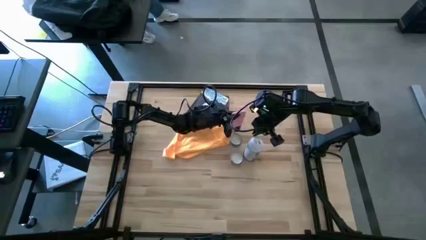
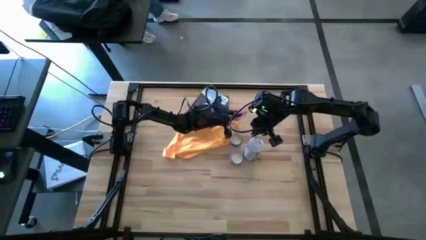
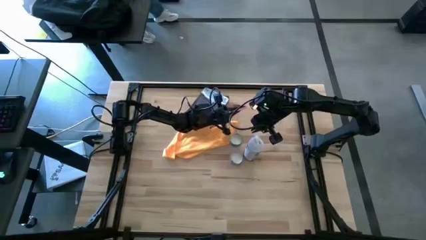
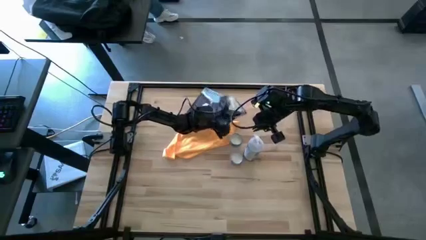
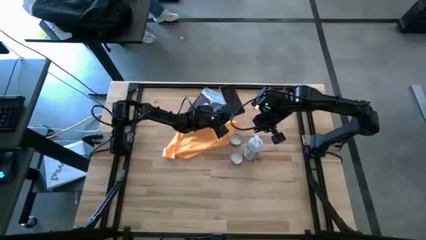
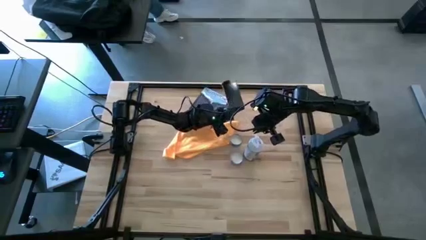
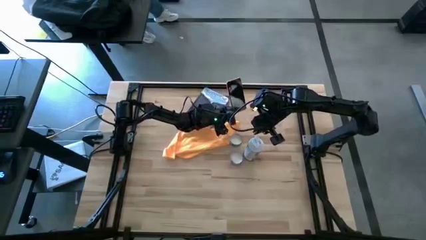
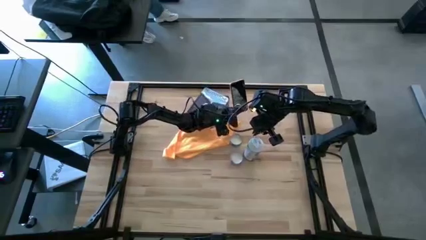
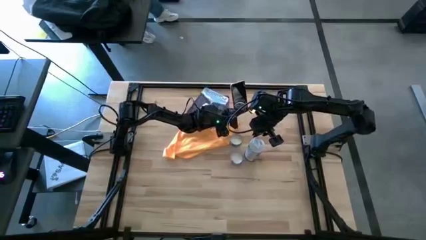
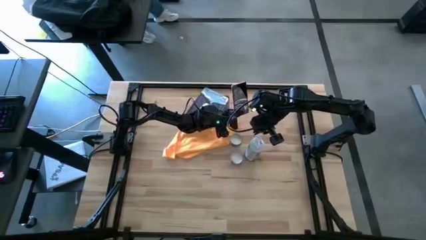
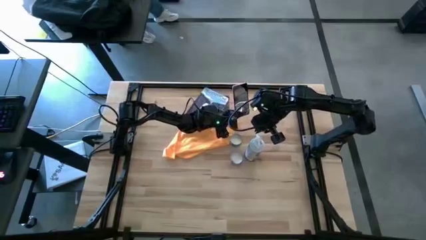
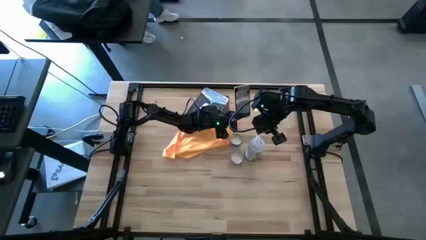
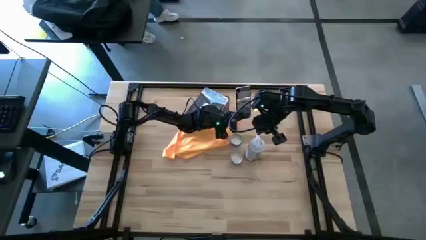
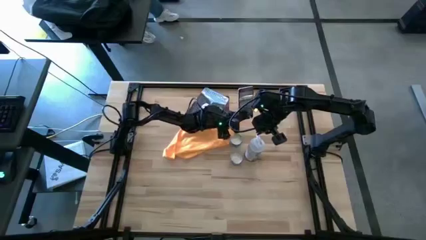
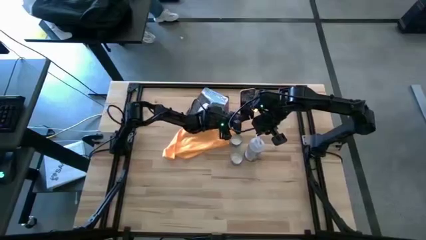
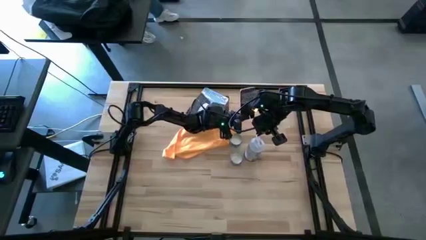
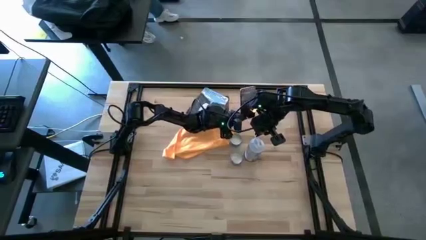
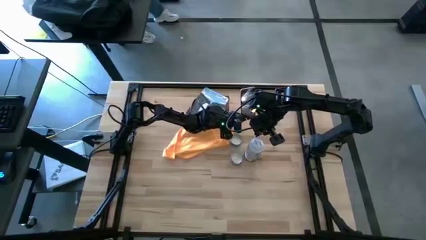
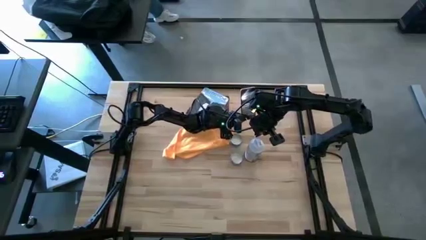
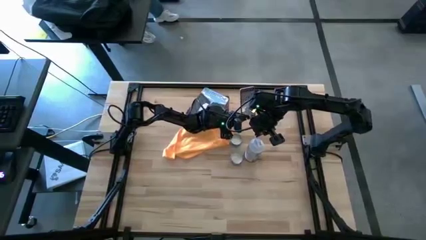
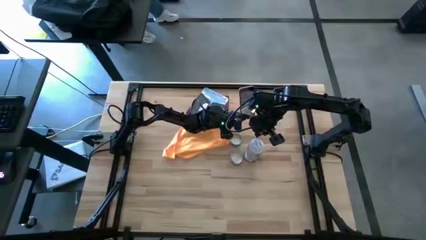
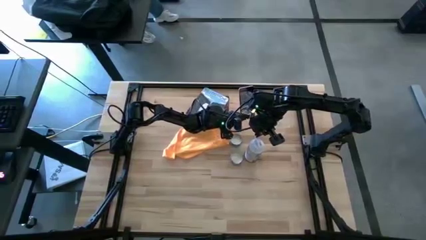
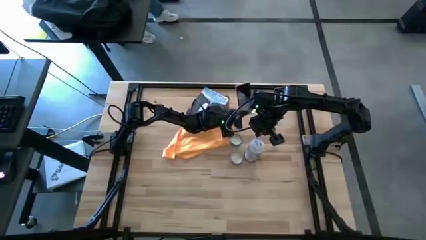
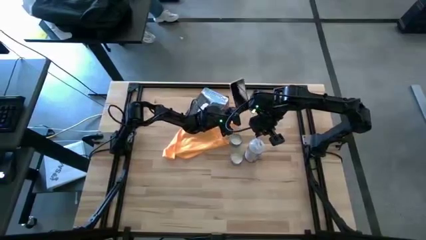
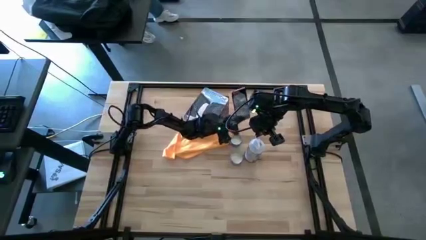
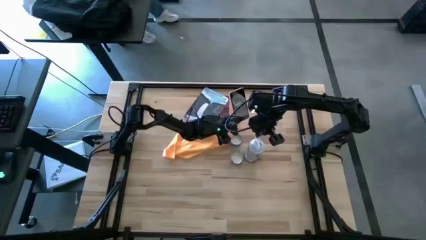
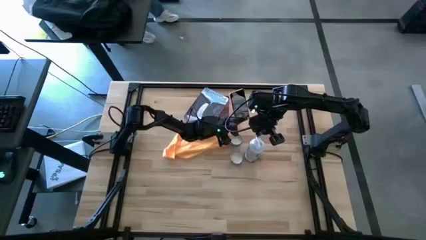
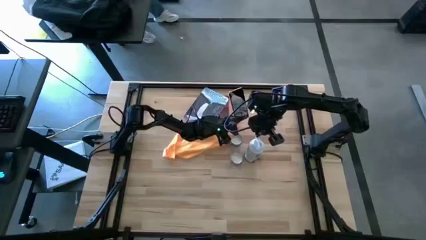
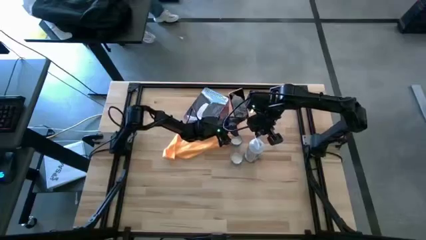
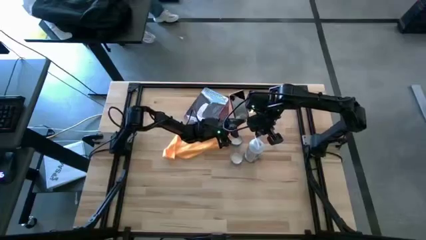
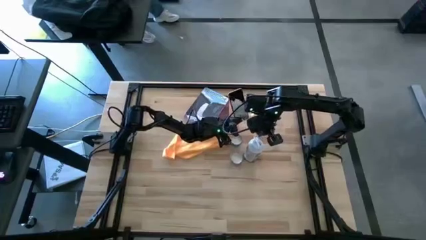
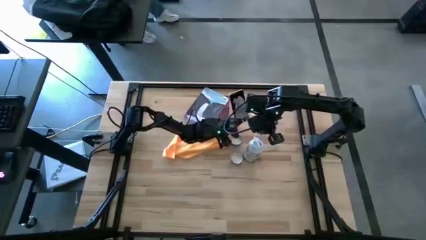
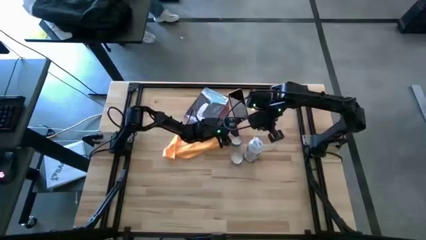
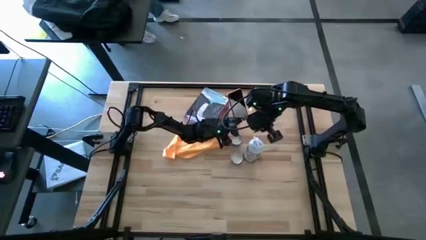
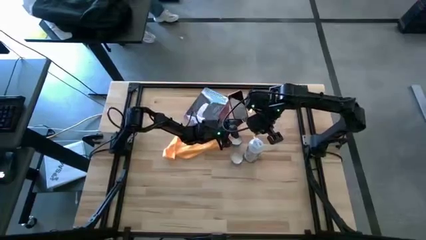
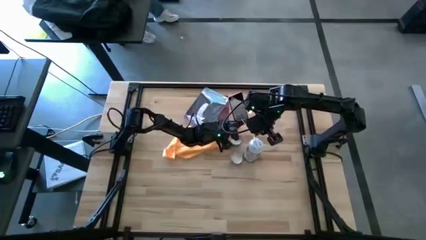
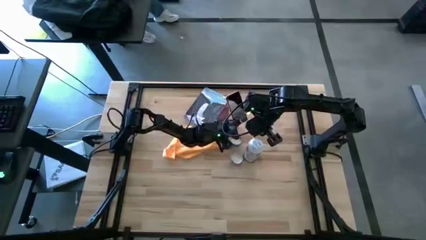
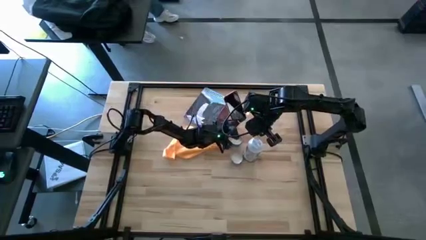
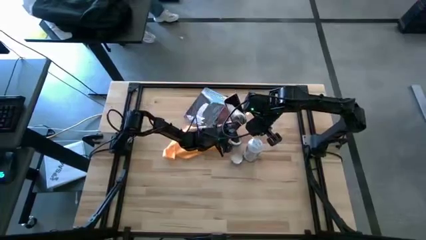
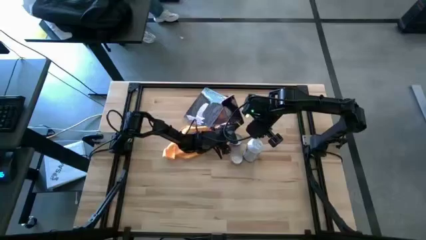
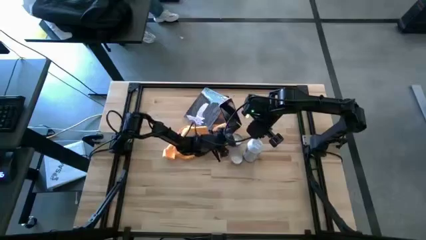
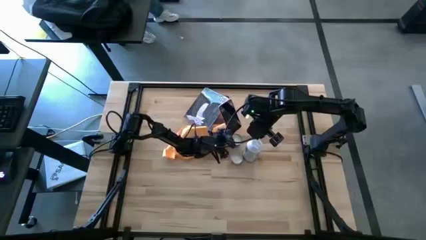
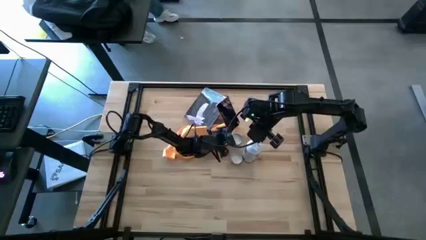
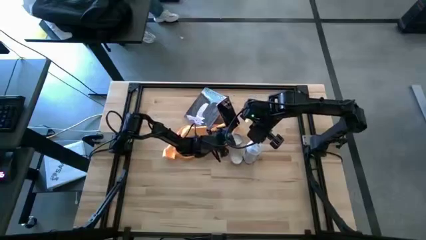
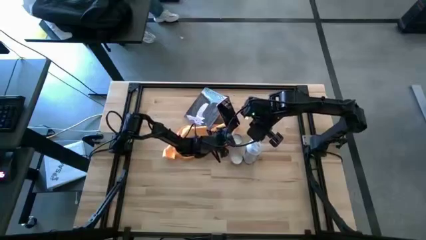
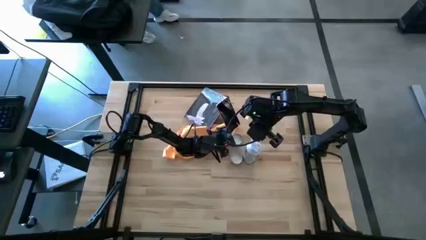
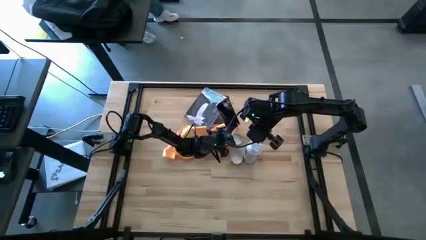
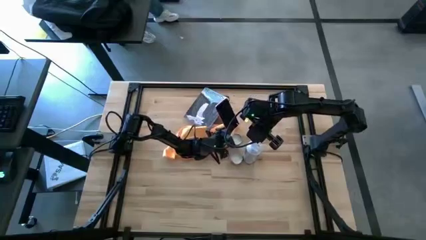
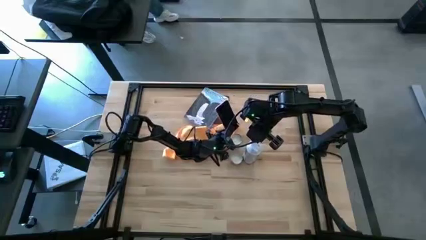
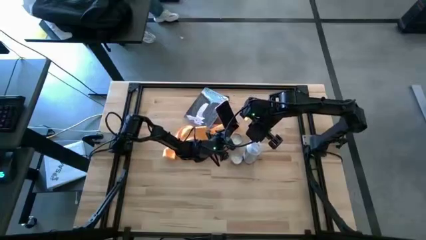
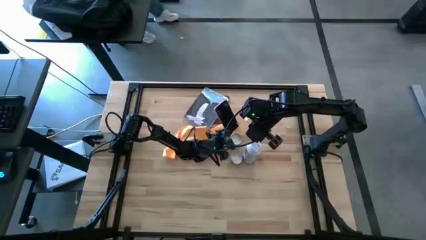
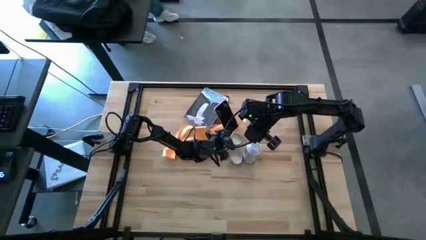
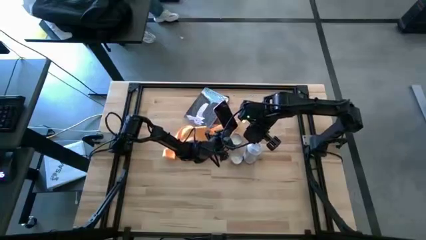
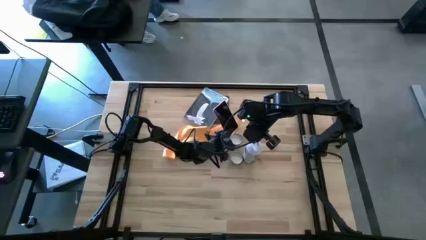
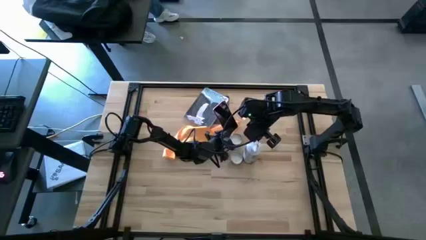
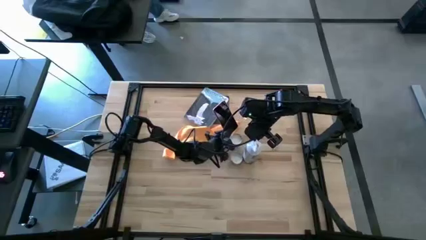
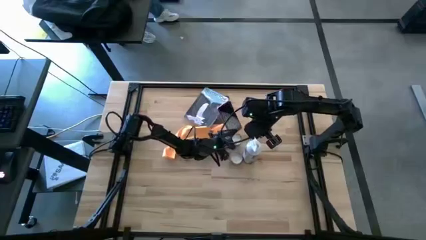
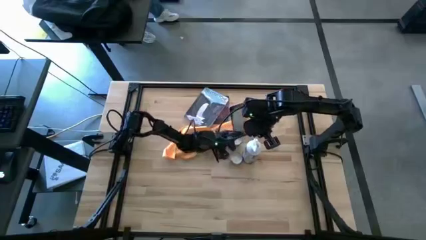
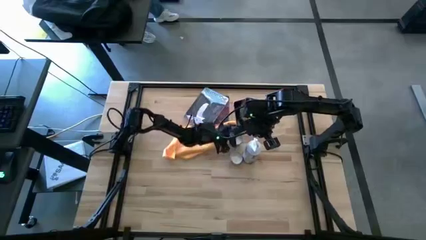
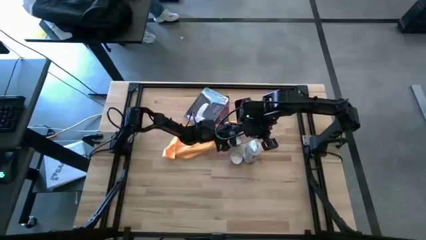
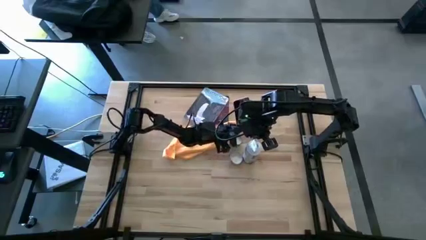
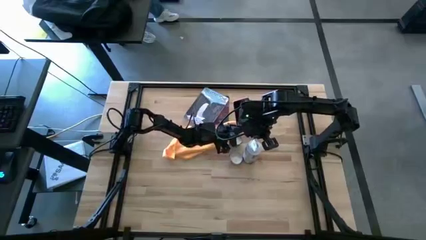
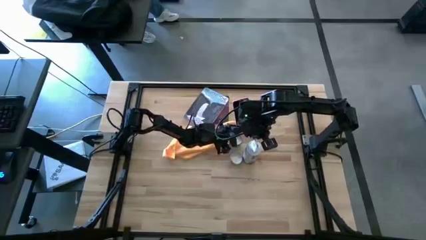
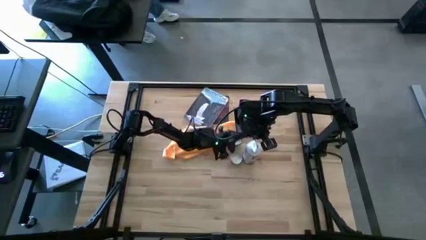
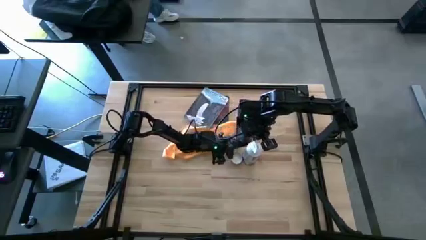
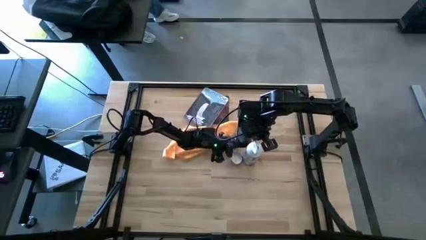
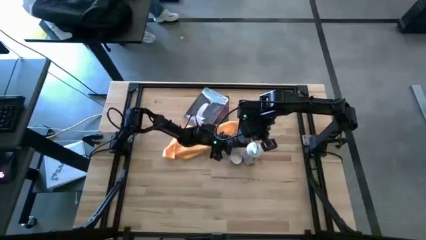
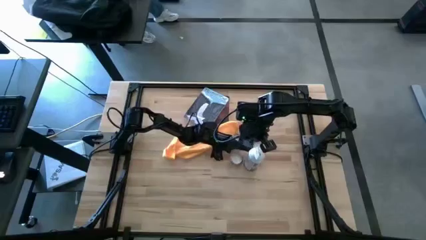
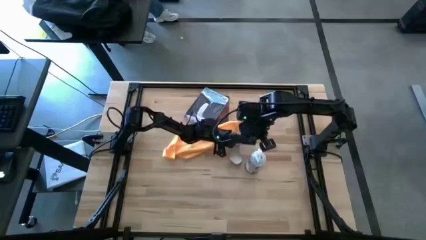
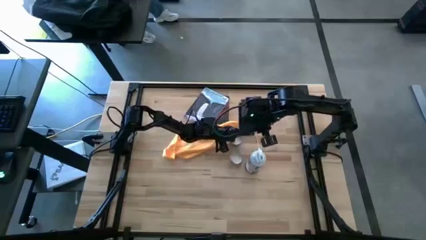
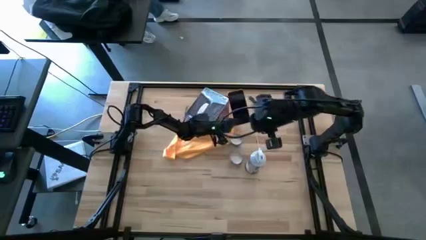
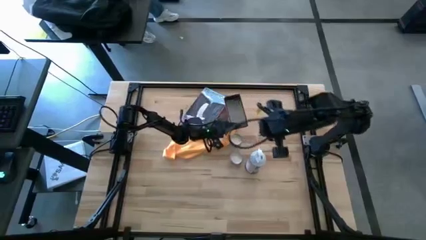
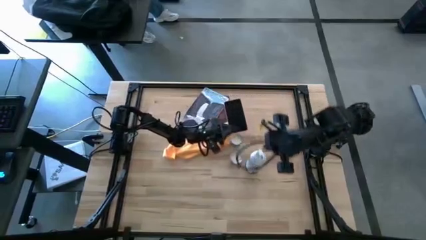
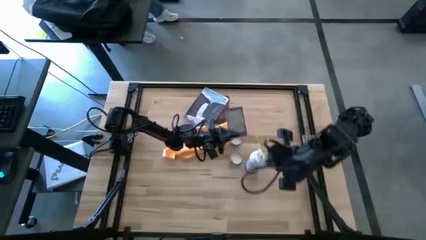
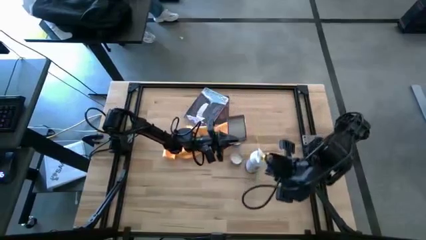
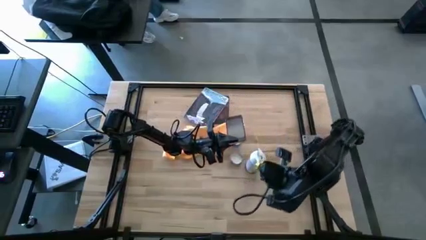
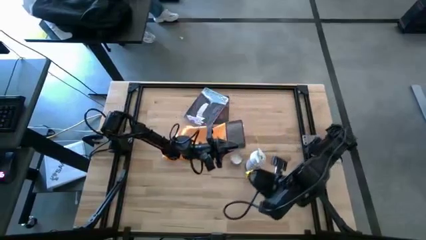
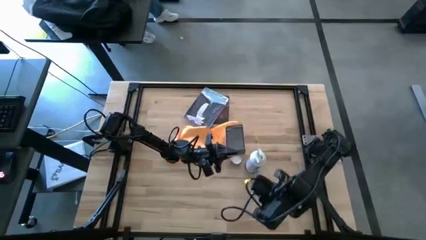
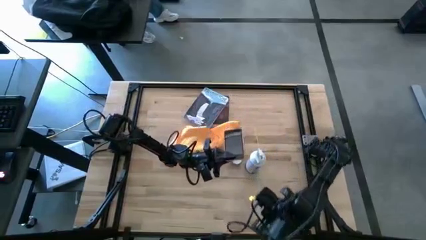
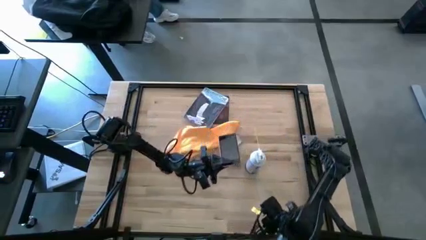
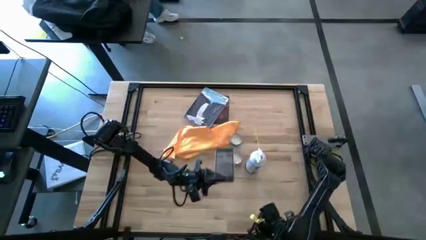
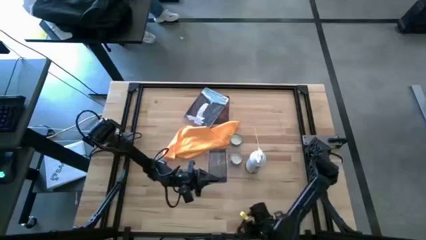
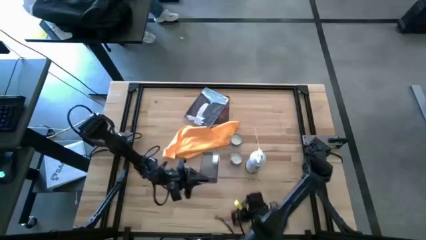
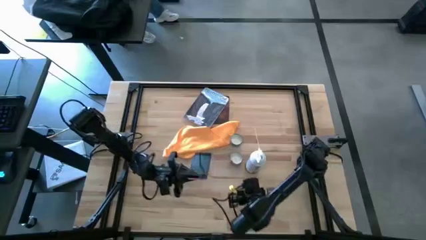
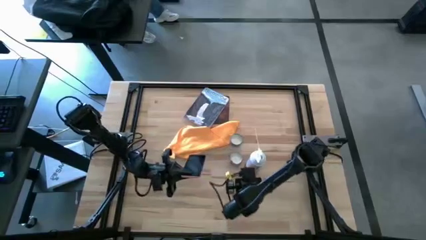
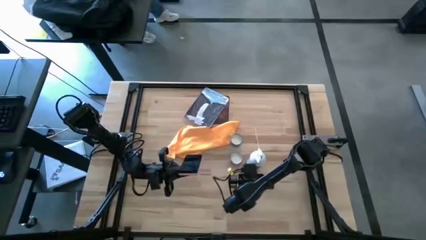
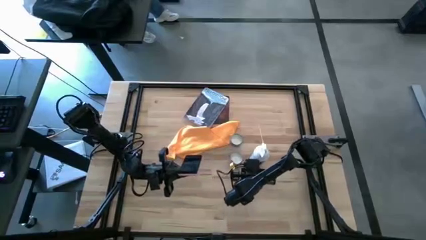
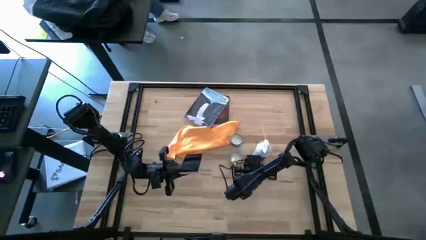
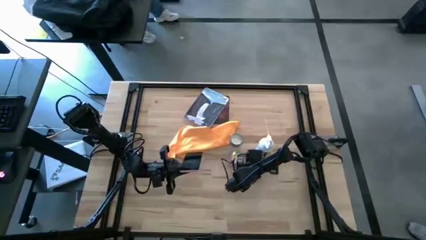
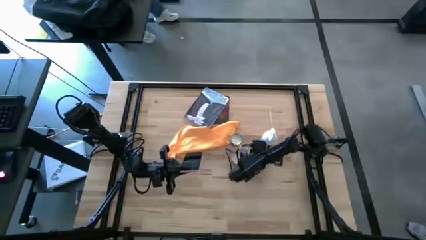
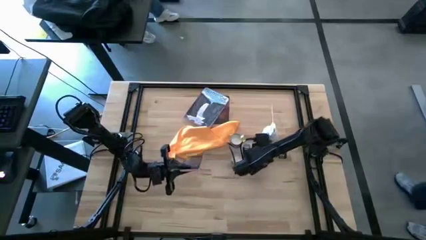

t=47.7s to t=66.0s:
Task: Apply microfiber cloth
Spray the pink phone using the white spray bottle
